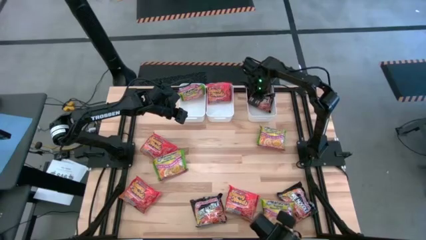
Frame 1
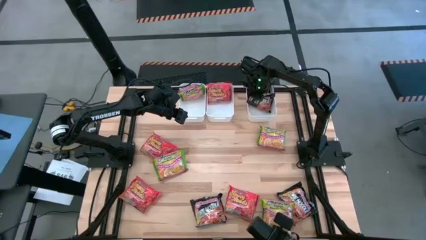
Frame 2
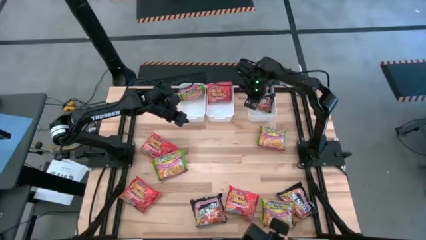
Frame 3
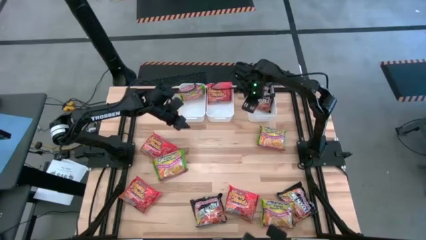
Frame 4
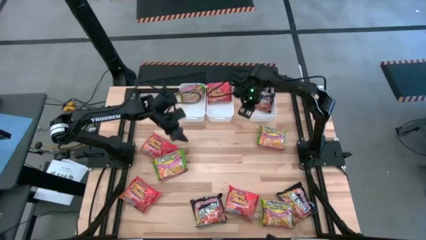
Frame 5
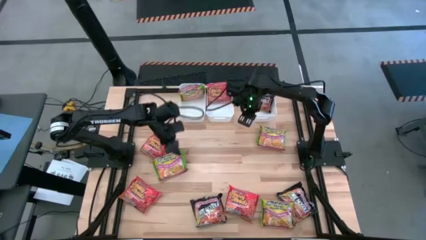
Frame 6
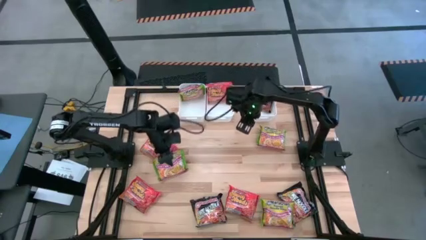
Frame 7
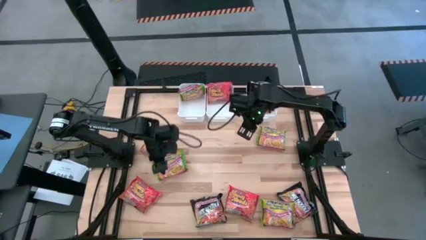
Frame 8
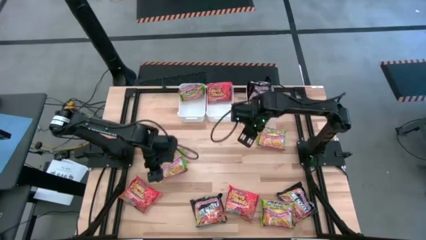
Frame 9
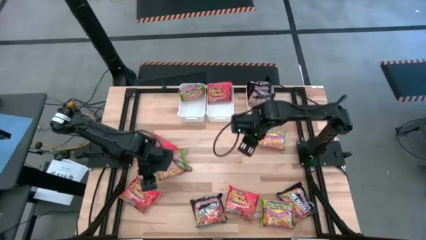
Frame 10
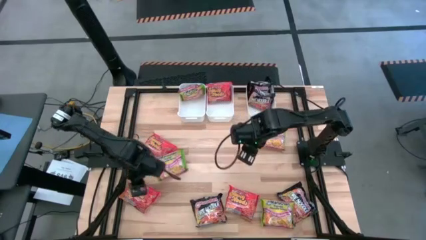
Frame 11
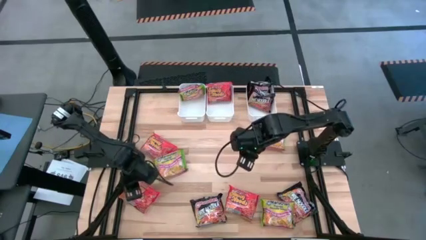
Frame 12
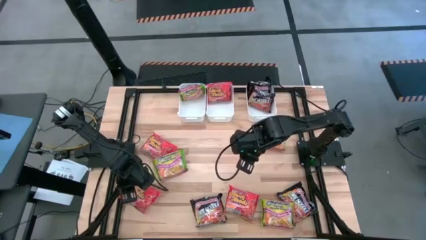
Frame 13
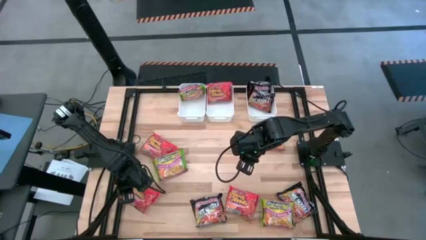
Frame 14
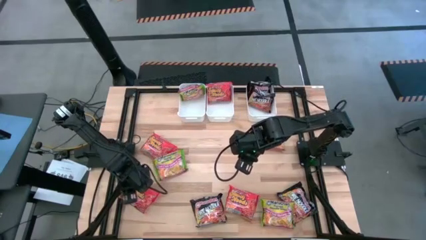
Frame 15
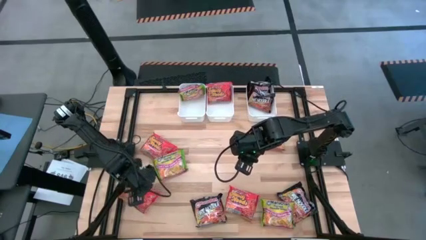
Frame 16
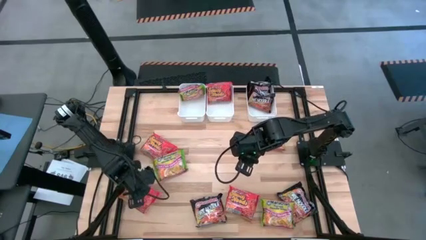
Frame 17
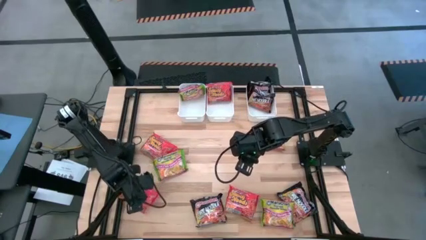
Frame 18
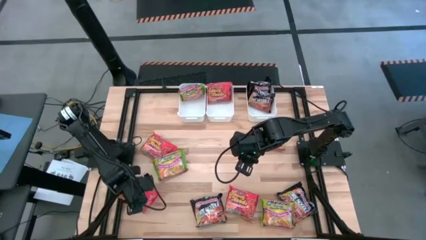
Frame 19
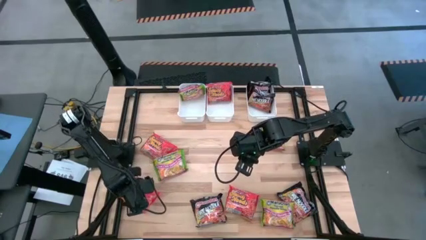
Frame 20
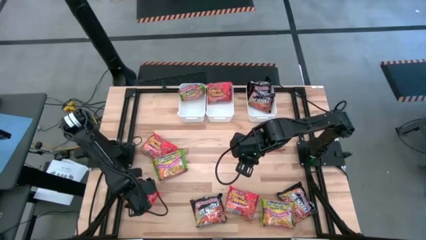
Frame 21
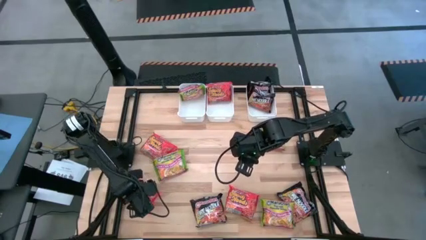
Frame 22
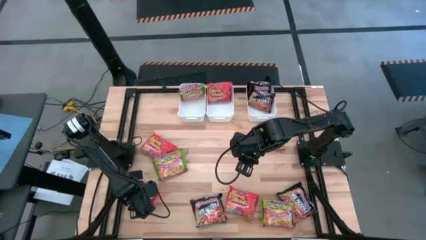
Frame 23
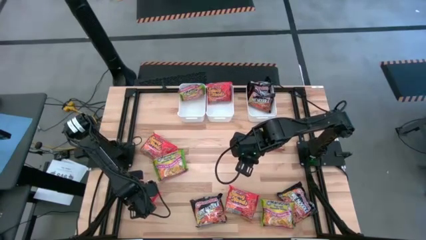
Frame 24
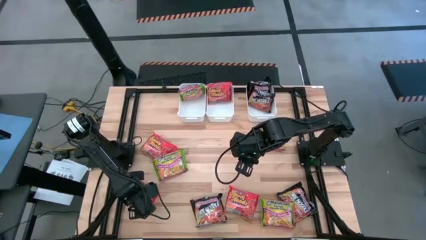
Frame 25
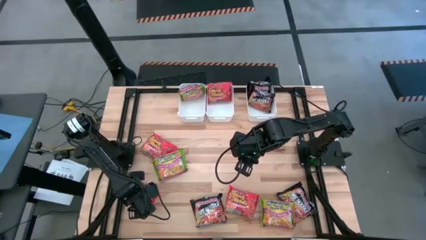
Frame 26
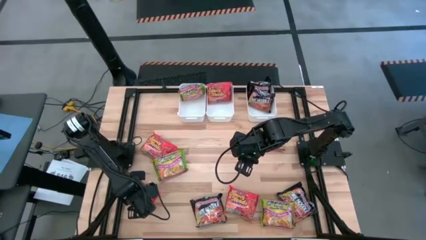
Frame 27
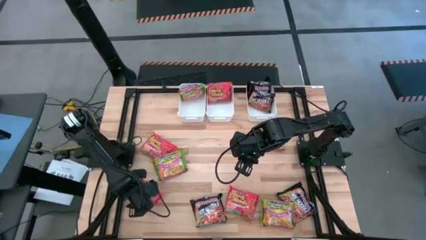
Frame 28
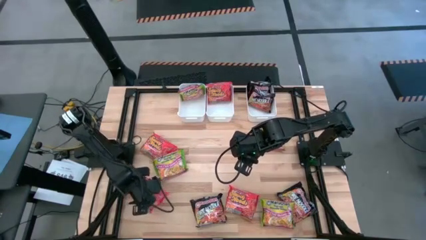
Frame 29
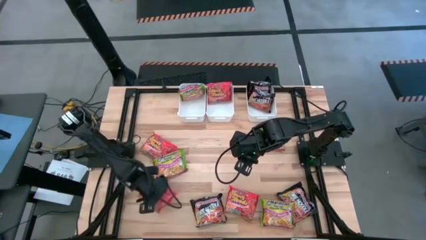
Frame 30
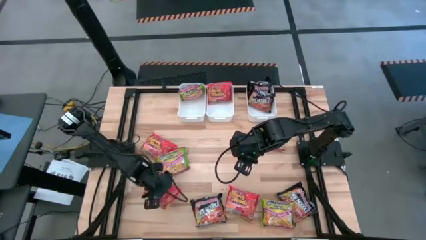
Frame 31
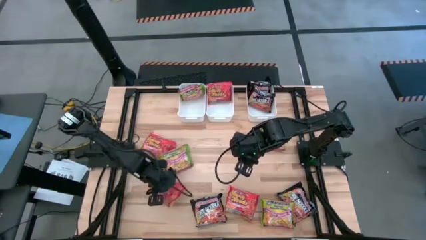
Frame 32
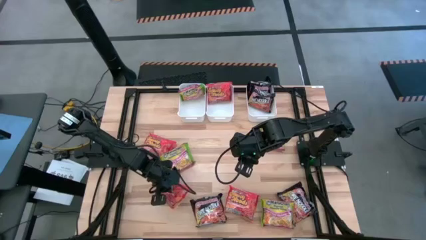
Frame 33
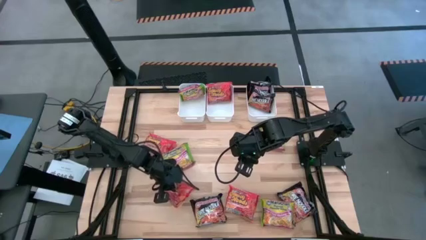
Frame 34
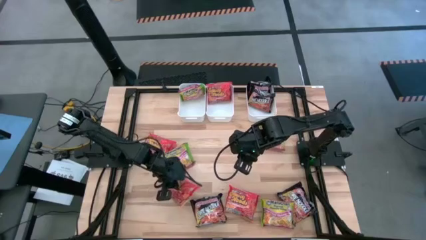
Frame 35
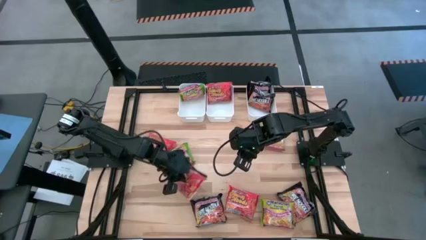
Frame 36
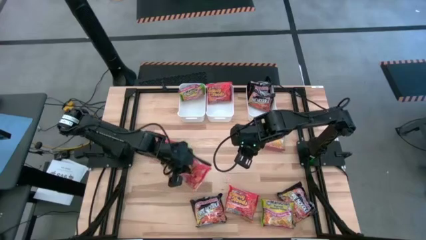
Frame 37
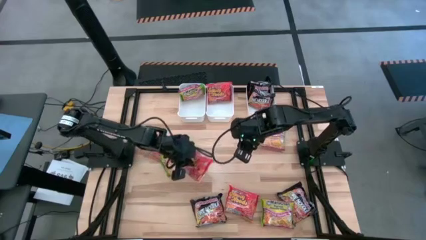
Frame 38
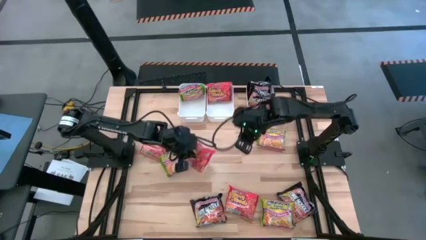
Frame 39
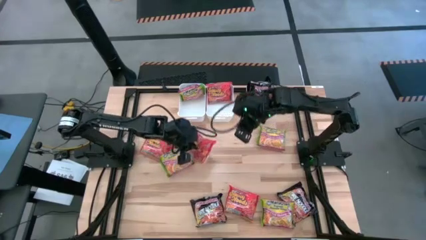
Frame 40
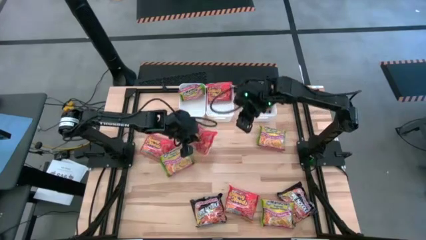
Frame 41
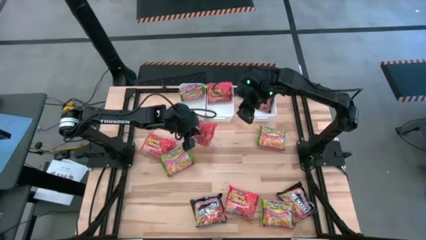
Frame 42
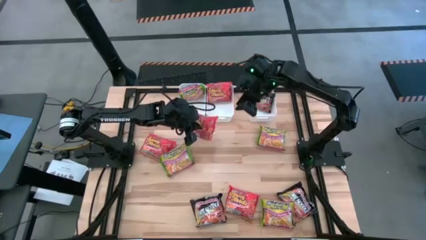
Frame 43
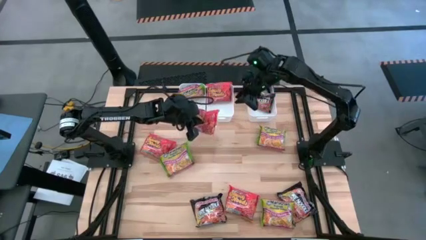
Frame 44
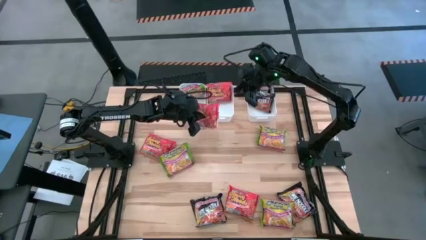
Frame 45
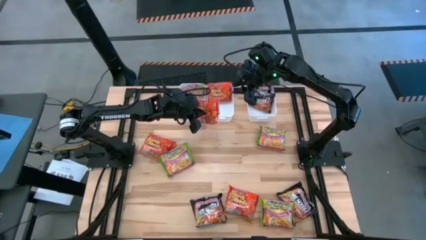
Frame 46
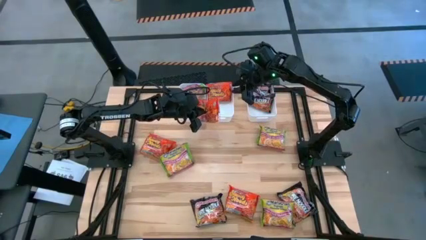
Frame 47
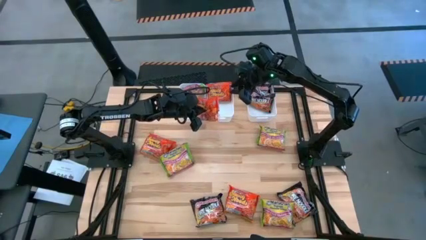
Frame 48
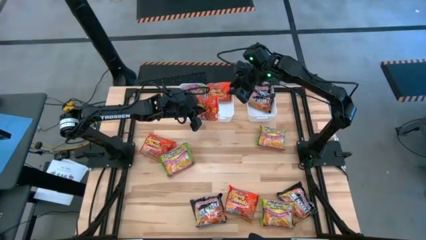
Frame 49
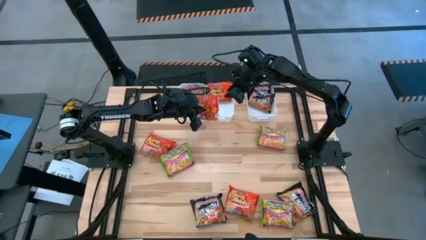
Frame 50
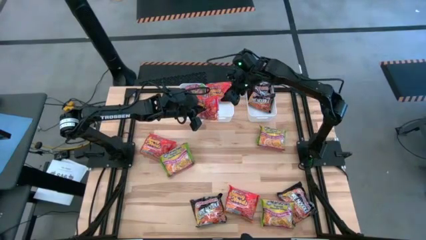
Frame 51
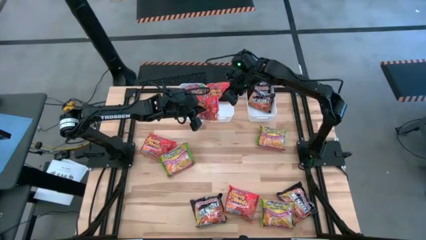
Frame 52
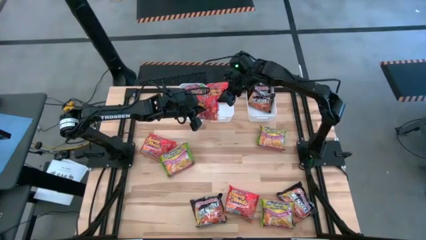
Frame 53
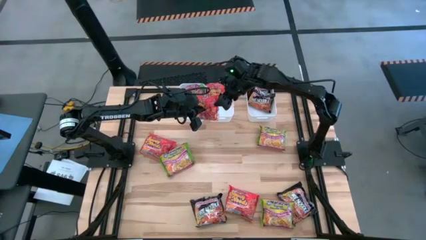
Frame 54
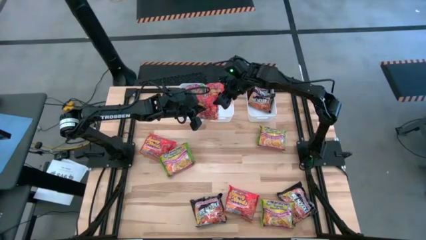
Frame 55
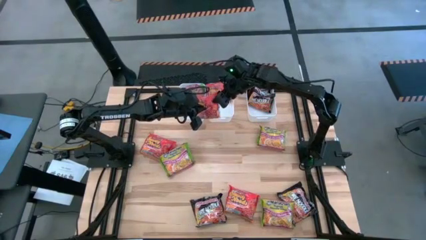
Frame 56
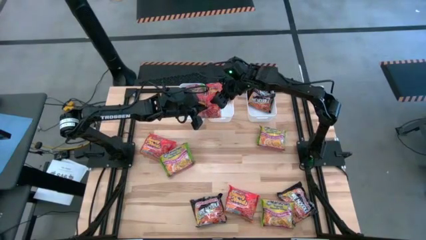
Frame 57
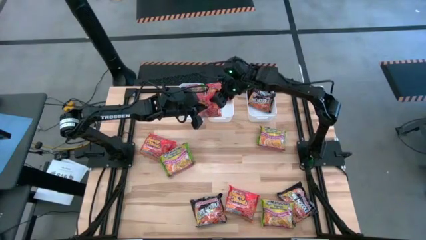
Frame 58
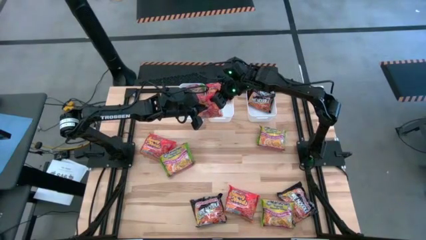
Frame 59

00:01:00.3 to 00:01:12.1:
Task: Sort Maruchan noodles
Put the orange noodle pack into the middle white bin

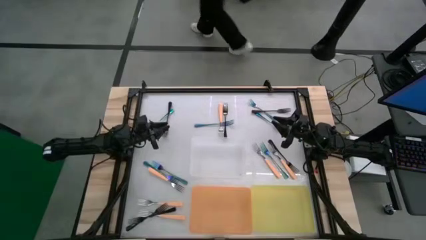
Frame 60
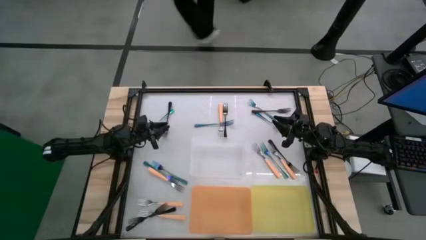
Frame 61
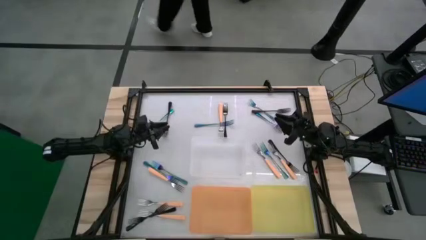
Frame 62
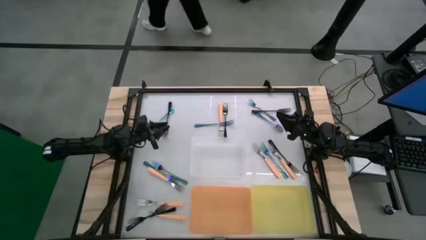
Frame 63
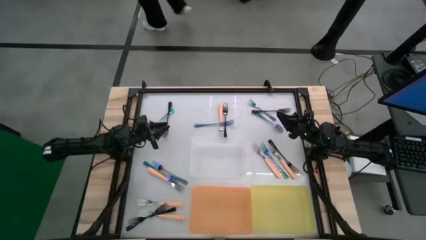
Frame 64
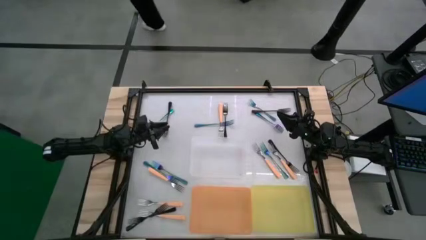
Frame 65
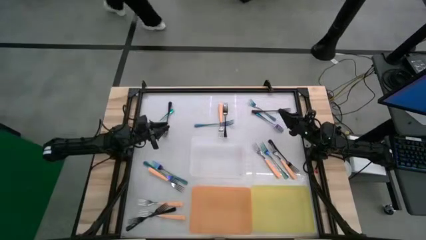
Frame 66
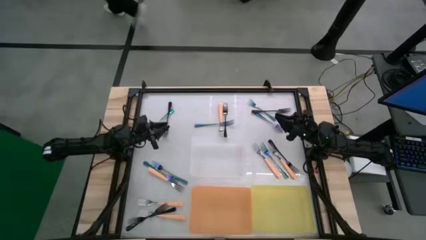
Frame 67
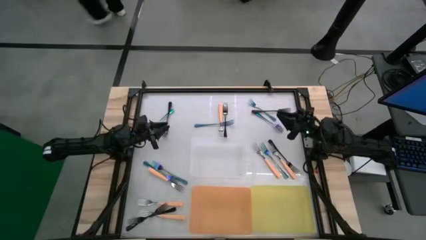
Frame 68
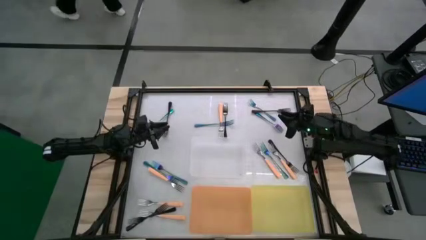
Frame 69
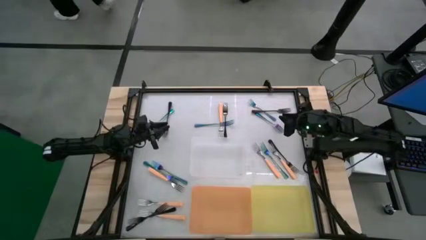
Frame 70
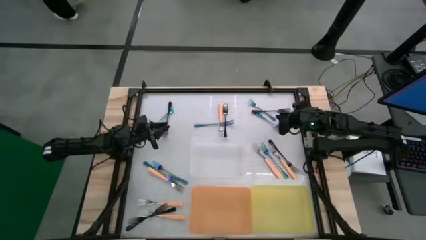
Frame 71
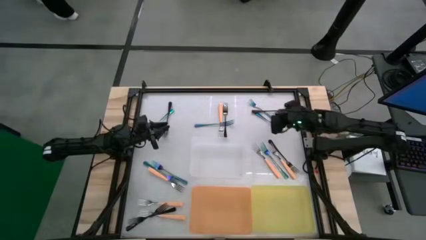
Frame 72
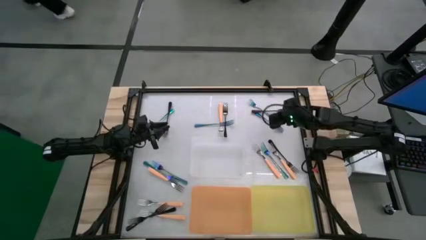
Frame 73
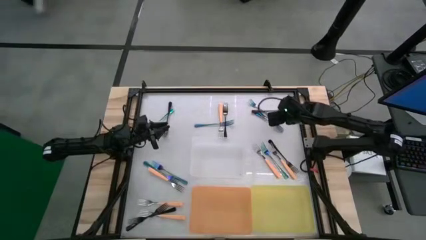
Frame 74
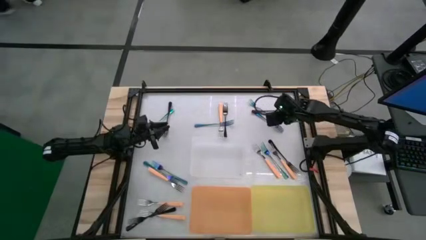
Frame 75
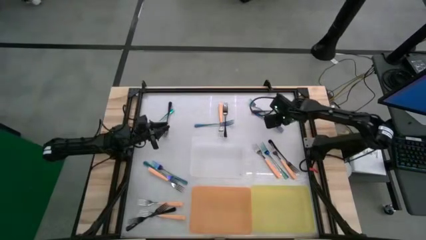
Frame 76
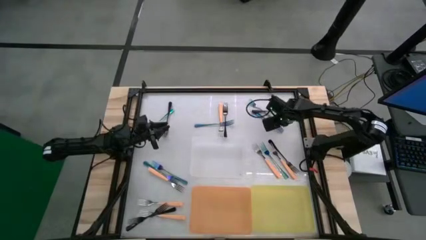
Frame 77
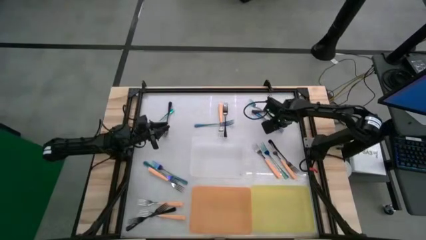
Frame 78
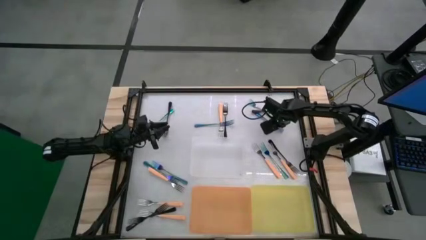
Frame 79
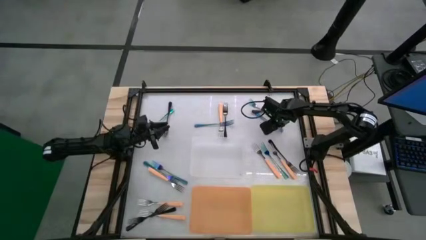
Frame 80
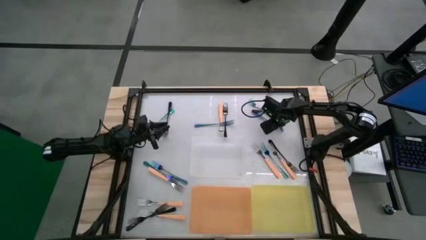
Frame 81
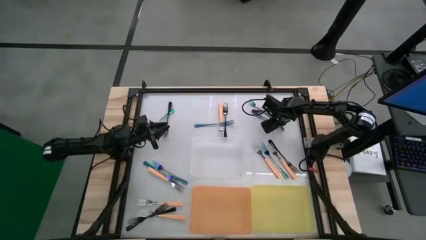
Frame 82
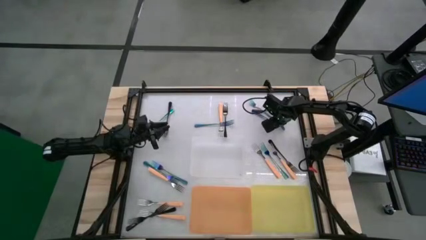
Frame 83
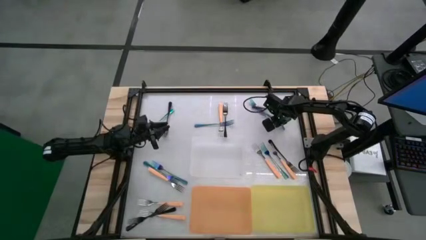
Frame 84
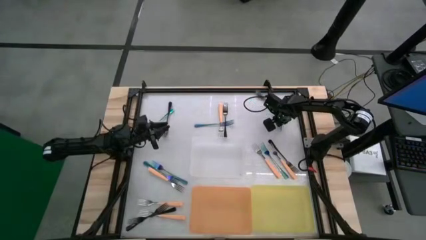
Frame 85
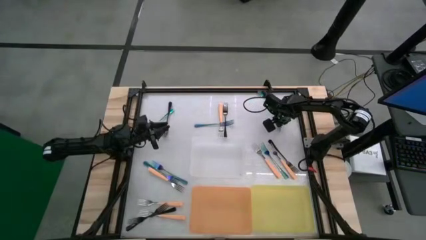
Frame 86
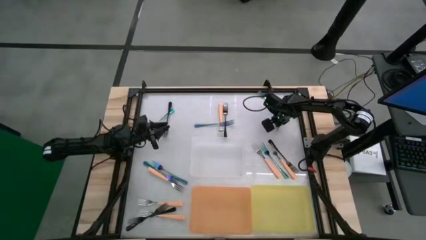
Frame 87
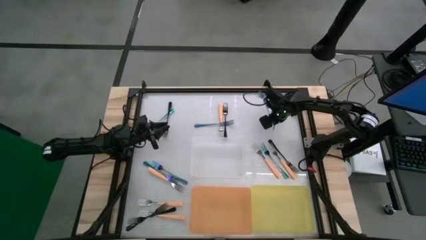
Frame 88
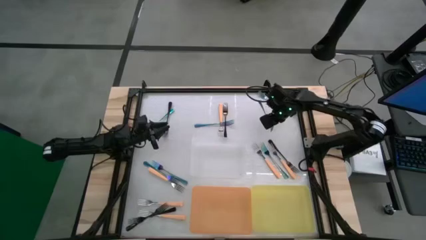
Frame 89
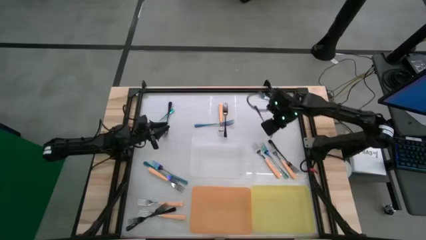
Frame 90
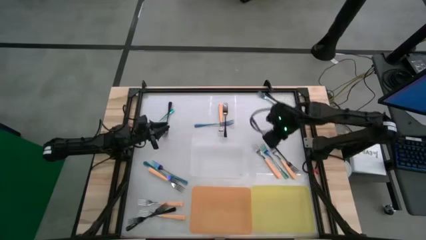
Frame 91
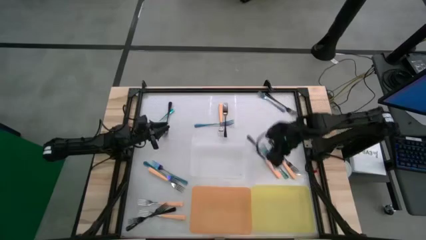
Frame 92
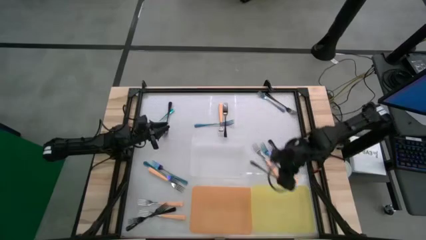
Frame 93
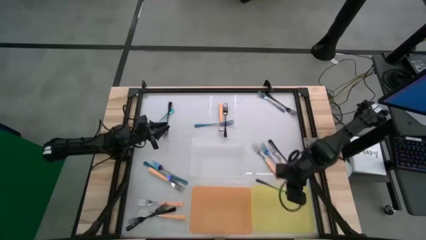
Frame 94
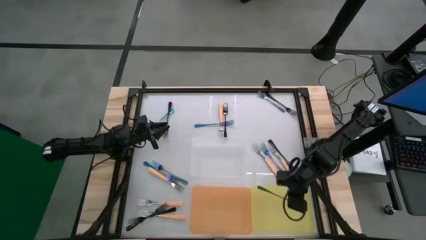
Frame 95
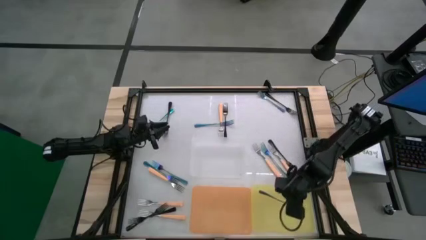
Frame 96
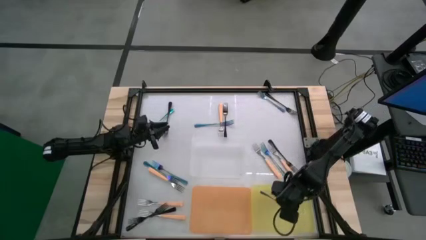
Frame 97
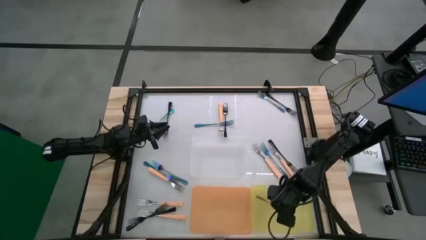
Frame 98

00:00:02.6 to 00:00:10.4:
Task: Sort silverware by color (type)
Put the blue fork into the yellow bin
